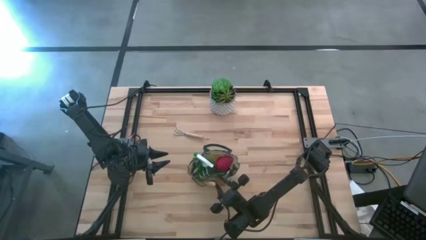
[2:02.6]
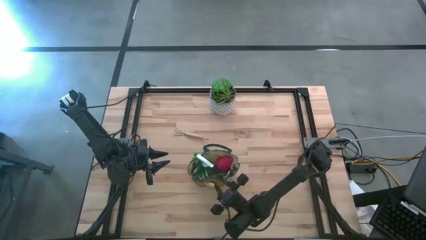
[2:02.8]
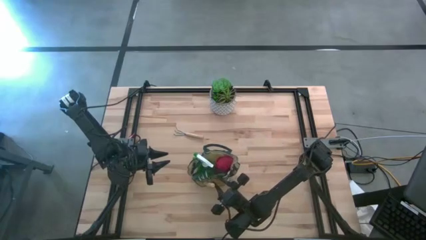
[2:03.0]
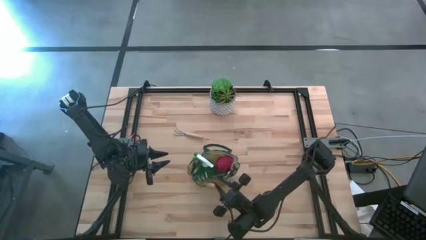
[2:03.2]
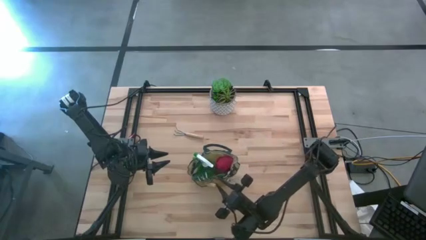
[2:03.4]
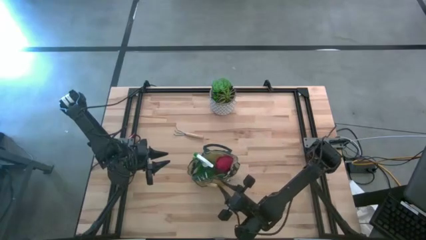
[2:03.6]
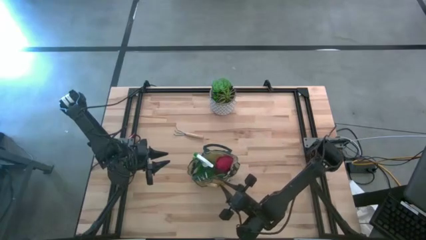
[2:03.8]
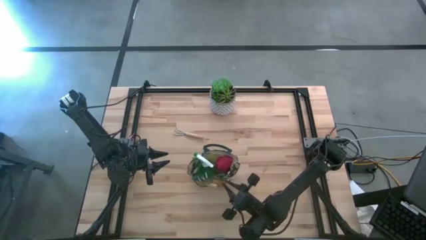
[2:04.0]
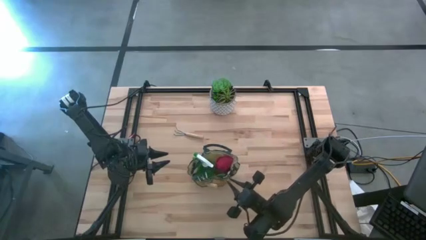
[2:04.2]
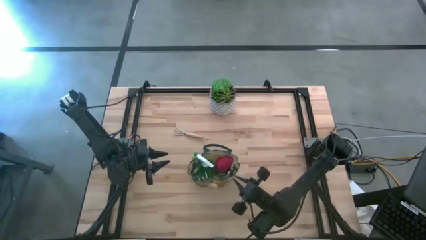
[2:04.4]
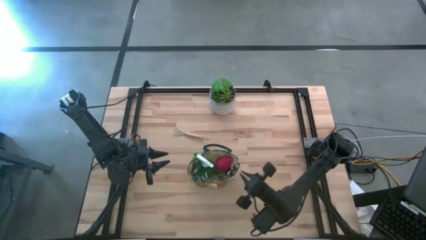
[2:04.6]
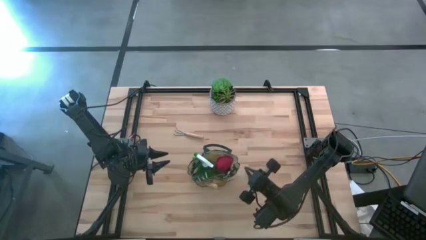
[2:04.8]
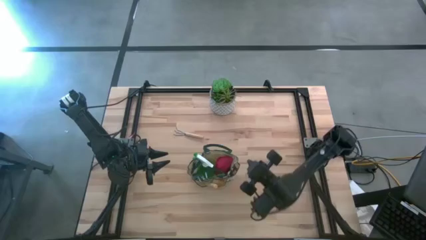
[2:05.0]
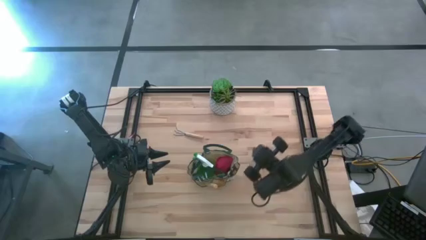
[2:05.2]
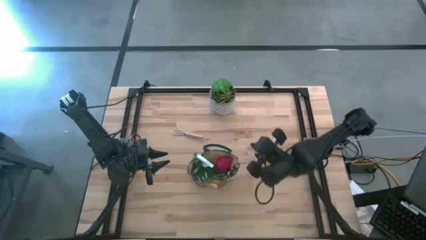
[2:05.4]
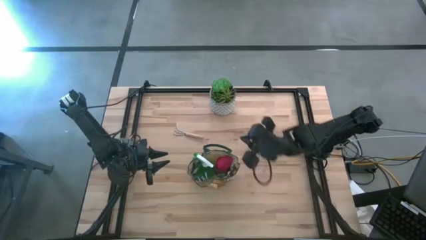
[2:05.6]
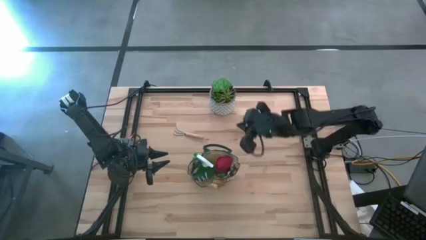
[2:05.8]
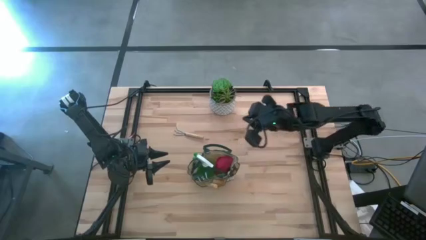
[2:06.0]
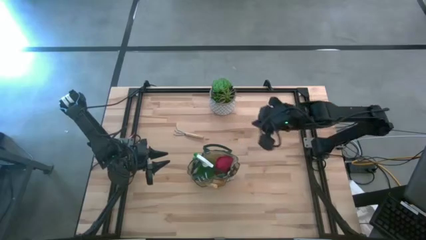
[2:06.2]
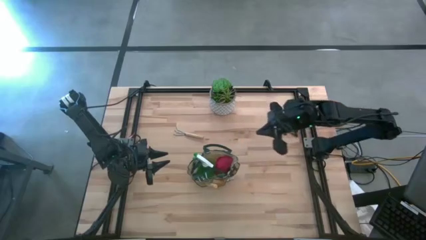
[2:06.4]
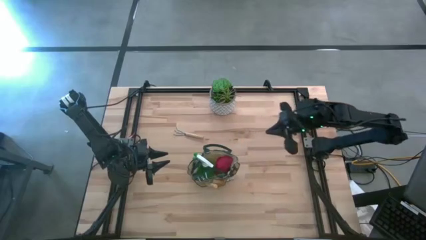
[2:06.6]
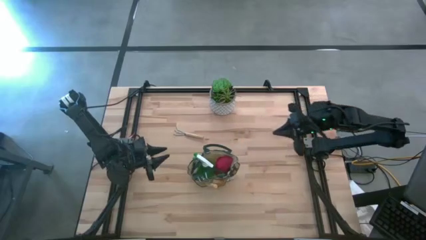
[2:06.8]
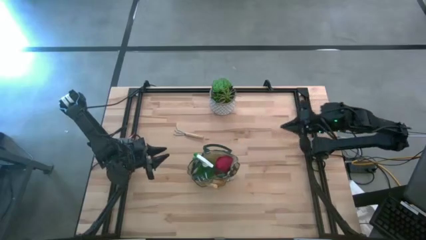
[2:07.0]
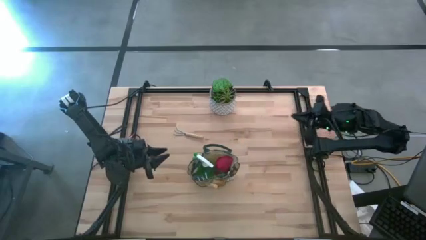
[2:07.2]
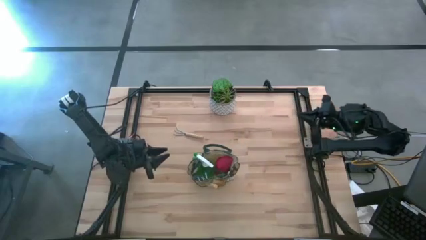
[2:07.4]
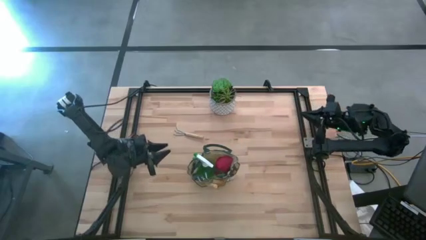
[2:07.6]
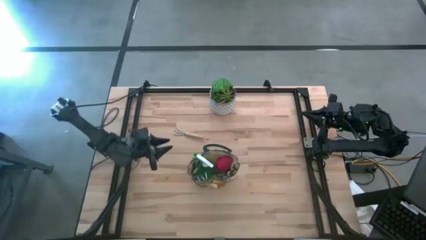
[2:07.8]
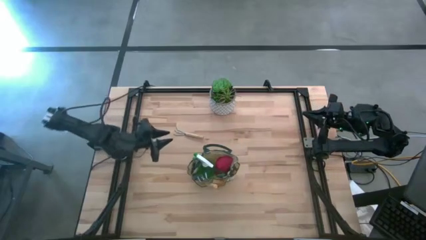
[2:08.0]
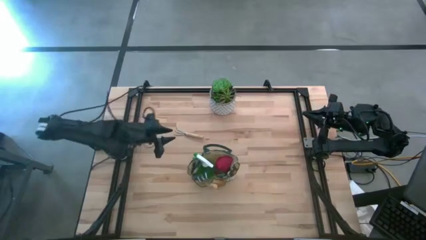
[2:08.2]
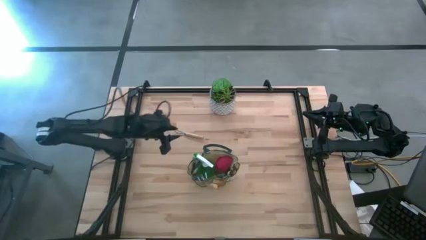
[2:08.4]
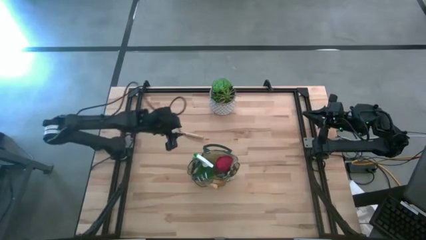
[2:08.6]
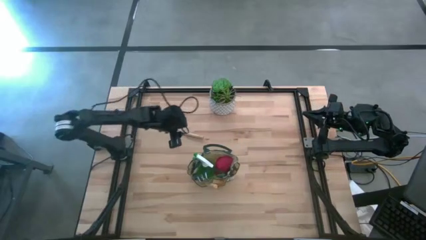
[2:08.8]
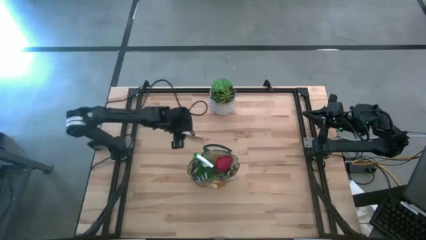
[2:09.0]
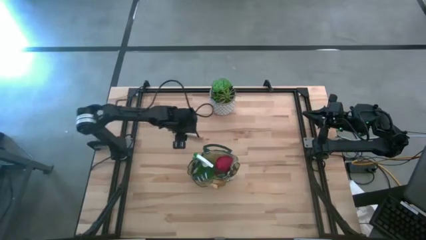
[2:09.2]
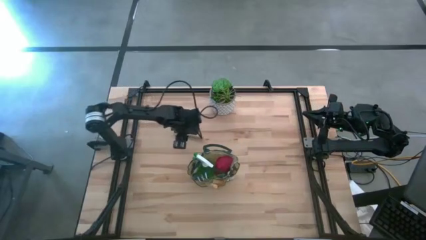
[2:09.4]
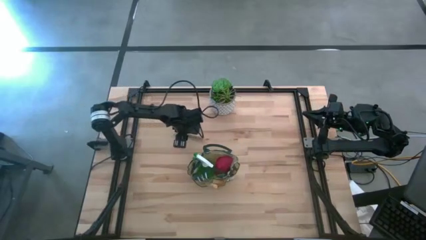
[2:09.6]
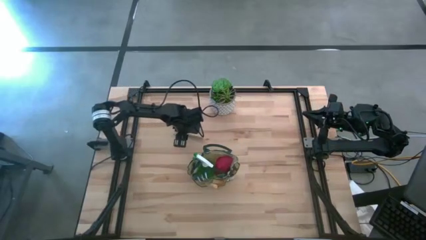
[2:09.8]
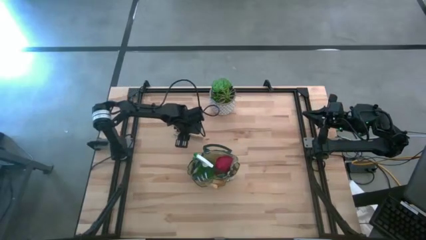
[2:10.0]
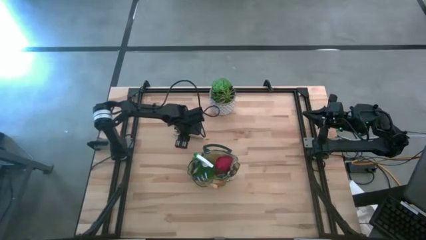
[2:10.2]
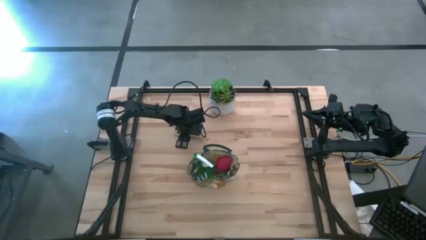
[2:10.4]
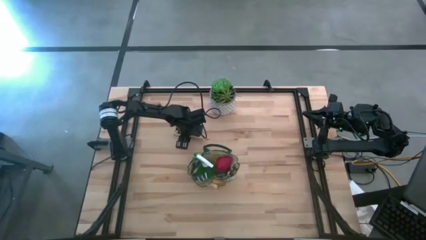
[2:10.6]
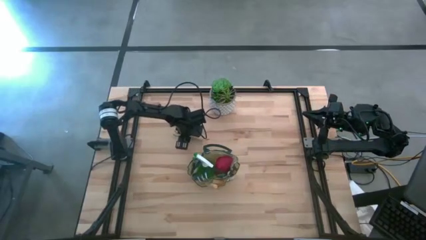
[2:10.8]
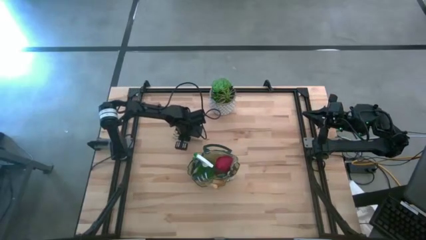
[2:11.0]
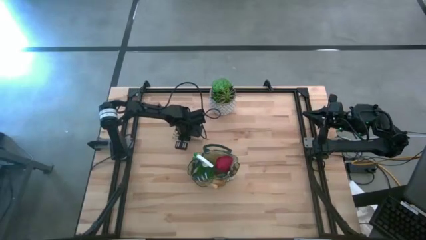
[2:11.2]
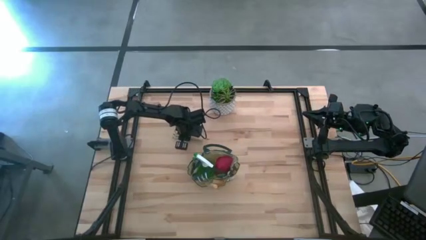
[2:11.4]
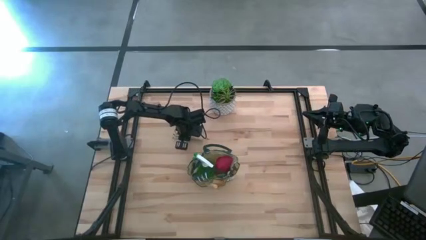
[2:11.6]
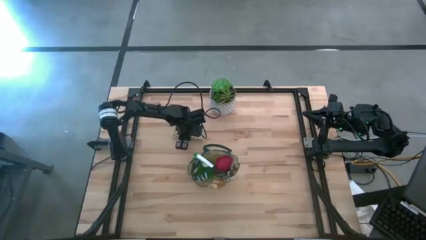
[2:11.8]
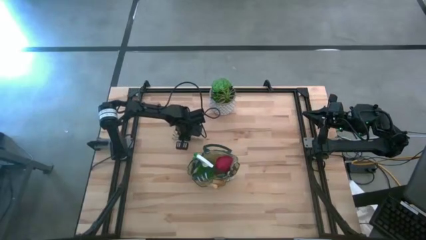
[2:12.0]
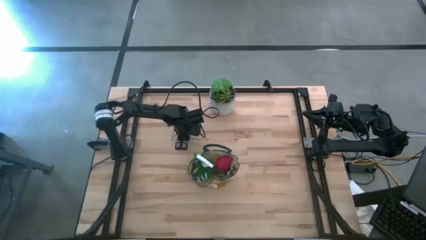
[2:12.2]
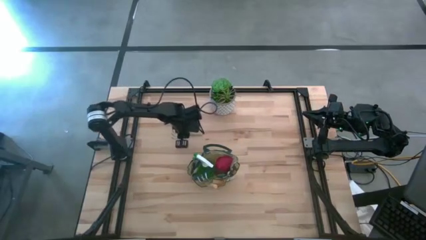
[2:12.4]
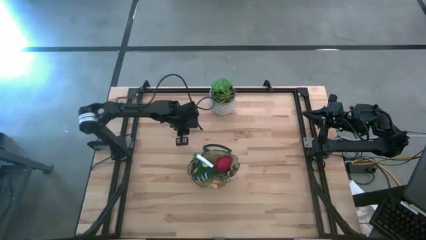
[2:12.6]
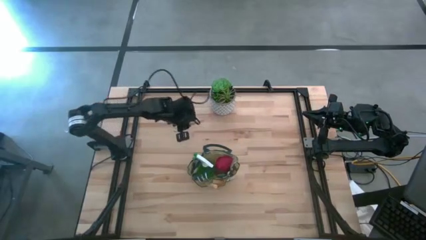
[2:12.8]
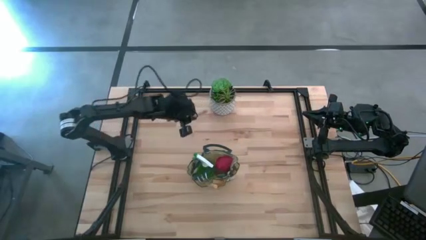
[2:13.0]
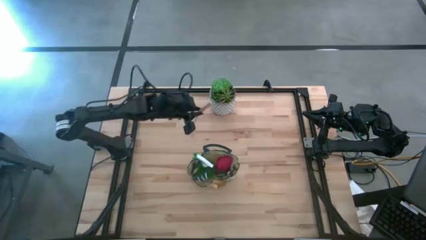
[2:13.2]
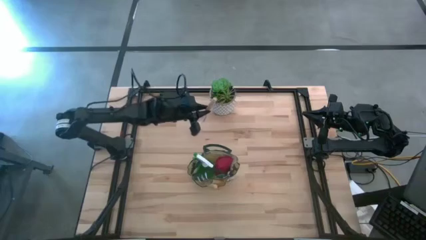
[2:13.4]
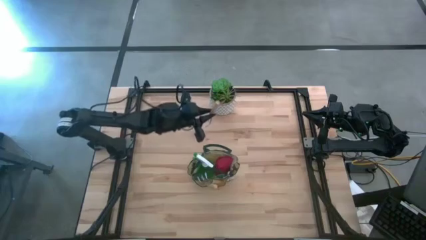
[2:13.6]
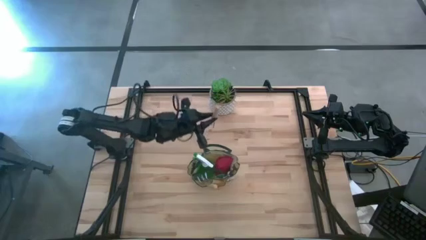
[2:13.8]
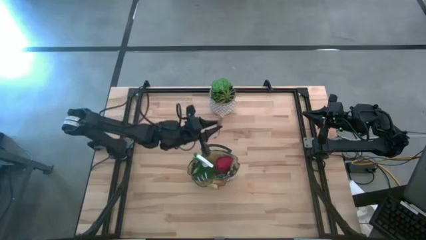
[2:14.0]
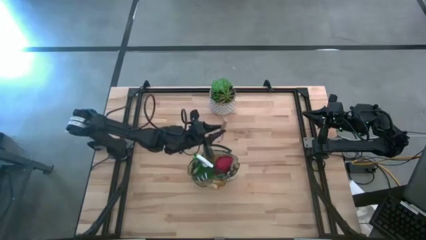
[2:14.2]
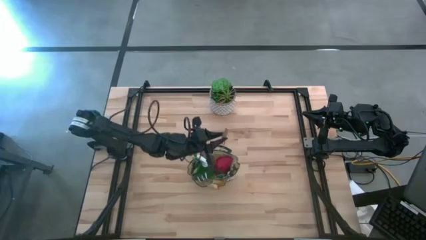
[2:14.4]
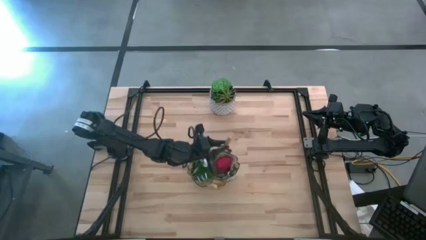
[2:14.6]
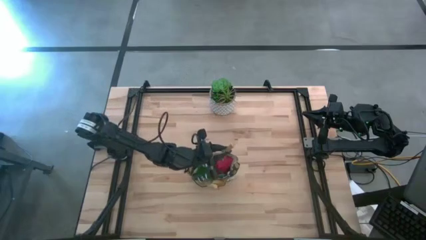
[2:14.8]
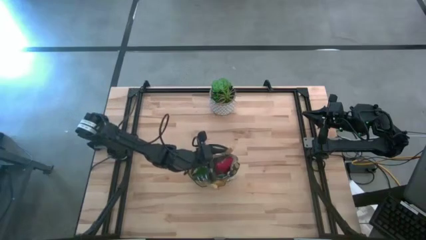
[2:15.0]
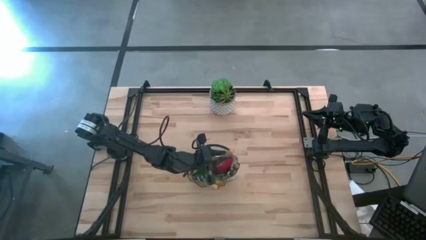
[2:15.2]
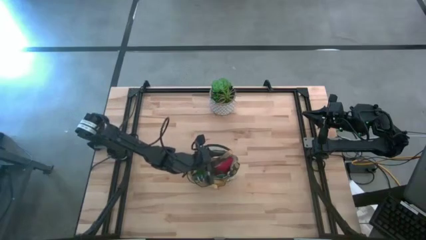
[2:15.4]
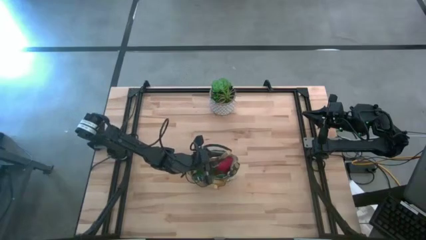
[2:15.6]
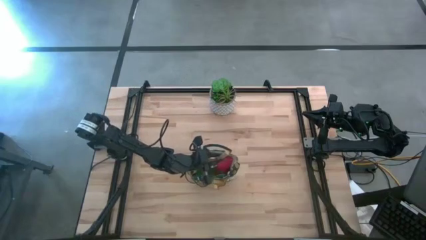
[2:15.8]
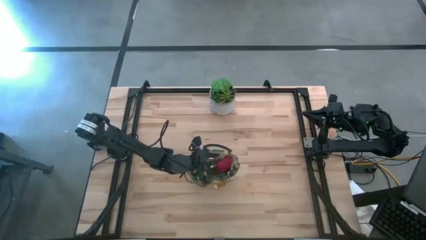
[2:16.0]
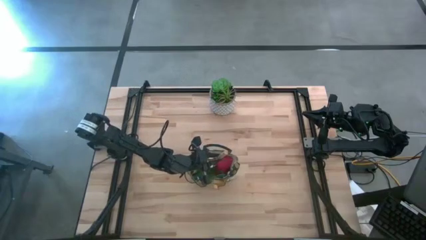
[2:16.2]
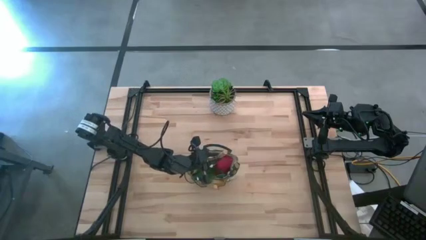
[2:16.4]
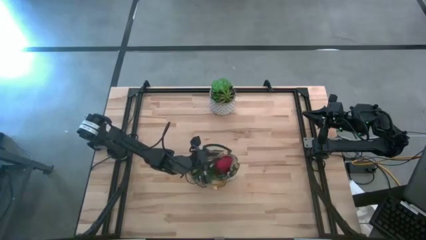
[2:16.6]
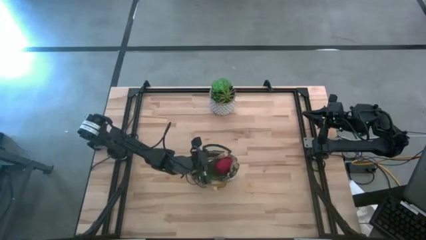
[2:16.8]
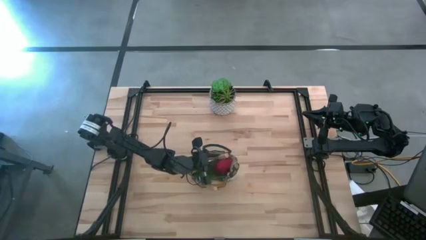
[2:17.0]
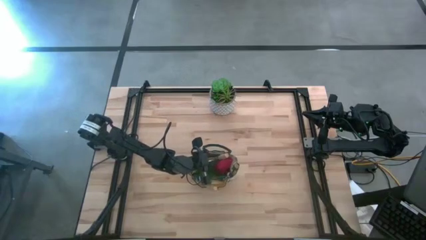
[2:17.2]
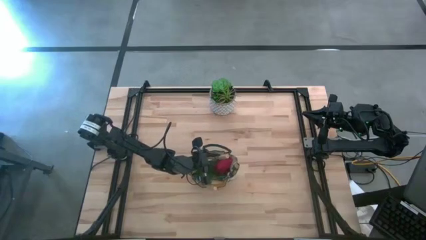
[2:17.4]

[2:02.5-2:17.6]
Task: Pick & Place Garden tools in Gardening bag
Put the light brown hand rake into the white gardening bag

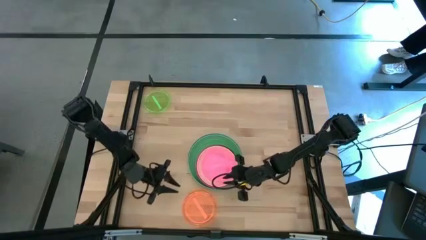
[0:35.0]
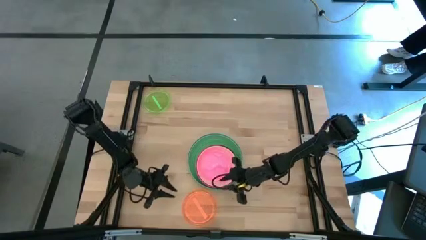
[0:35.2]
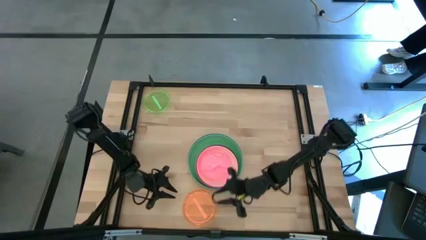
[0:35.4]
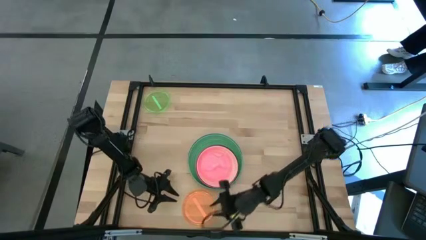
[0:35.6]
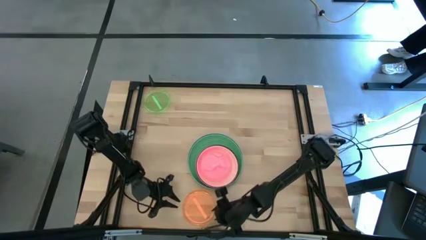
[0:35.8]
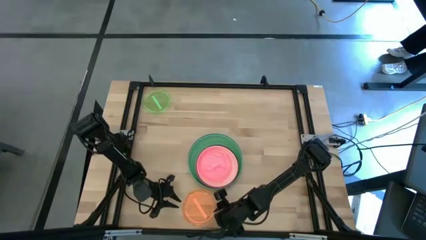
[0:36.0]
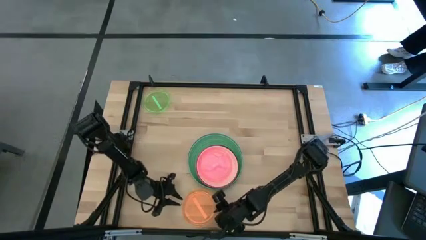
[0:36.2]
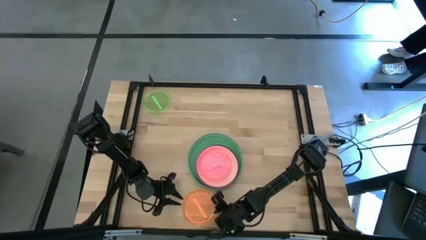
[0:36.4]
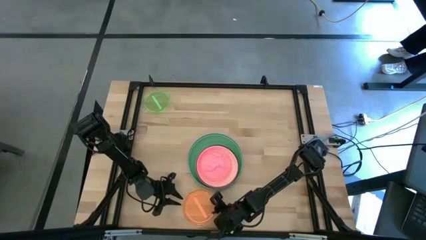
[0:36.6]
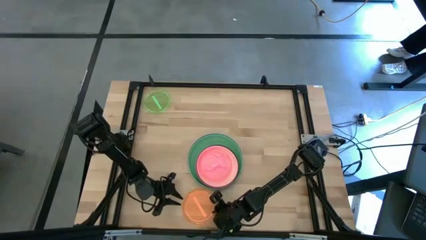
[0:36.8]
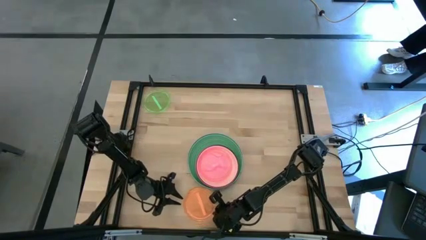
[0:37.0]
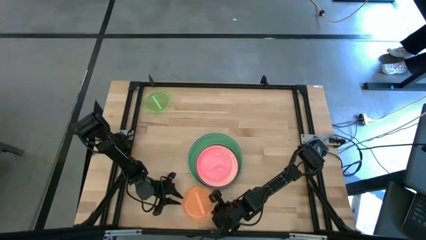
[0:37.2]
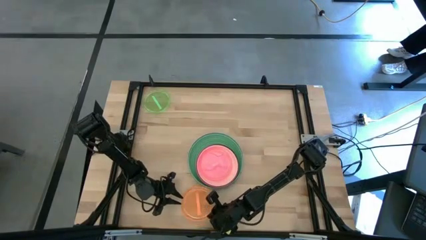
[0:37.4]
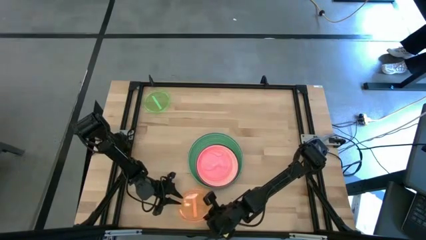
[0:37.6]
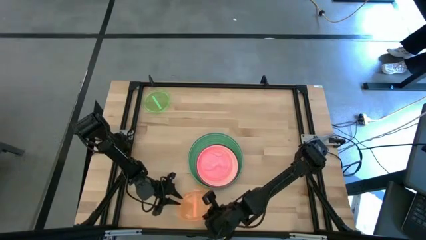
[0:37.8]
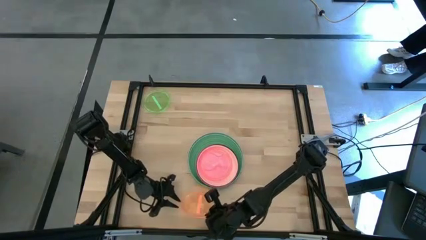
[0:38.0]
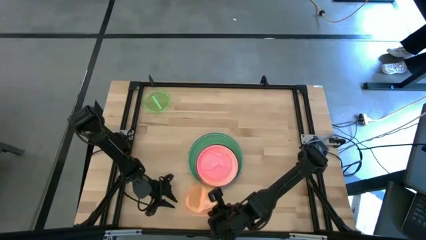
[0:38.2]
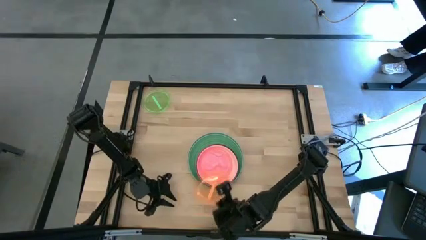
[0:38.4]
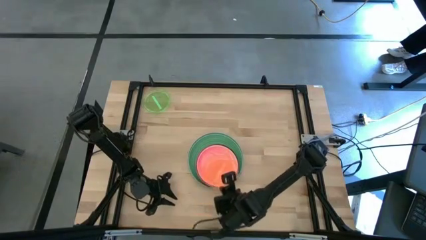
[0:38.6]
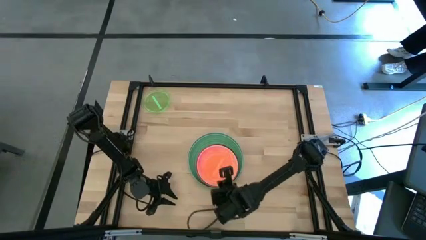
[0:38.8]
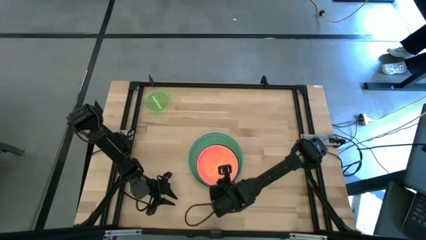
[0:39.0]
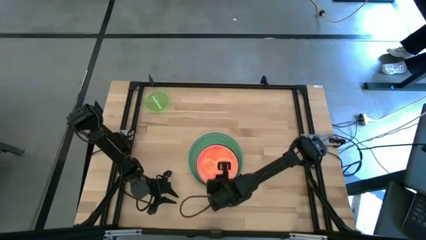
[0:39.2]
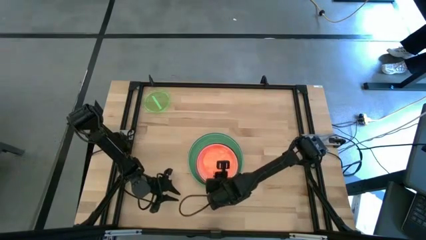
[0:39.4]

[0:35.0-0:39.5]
Task: Stack plastic plates
Stack the small orange plate on top of the small pink plate
